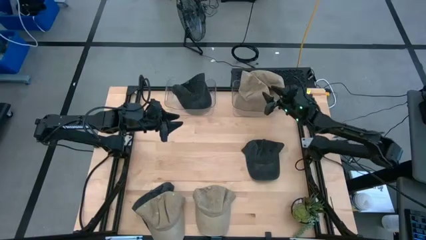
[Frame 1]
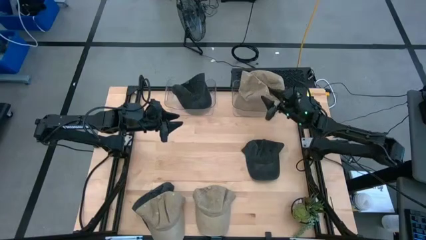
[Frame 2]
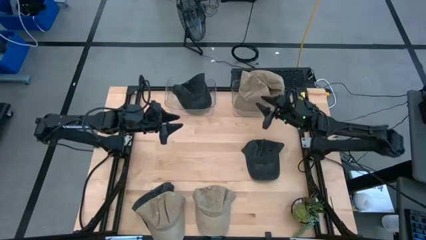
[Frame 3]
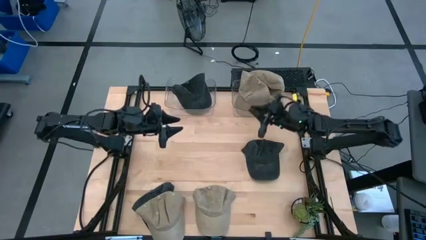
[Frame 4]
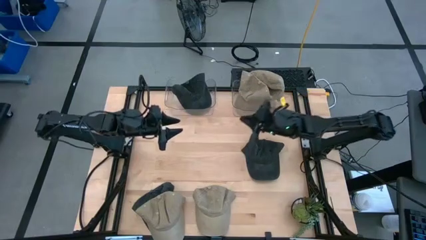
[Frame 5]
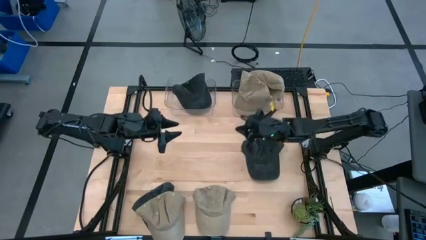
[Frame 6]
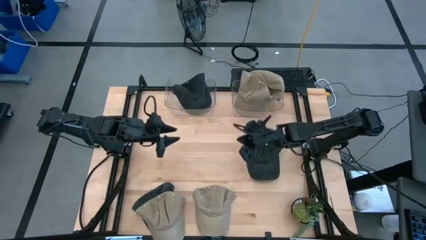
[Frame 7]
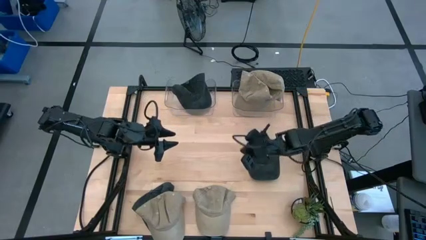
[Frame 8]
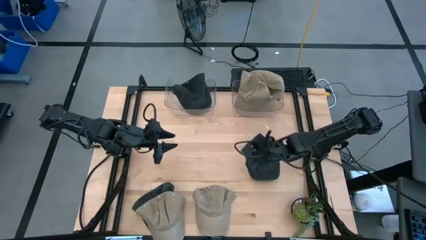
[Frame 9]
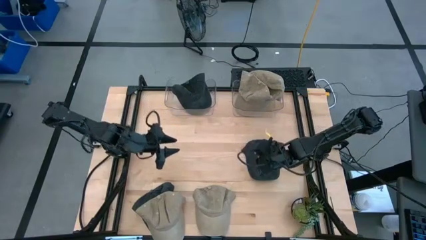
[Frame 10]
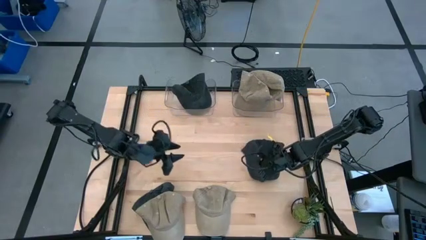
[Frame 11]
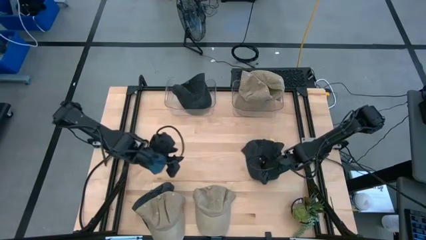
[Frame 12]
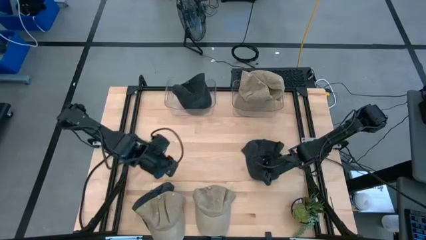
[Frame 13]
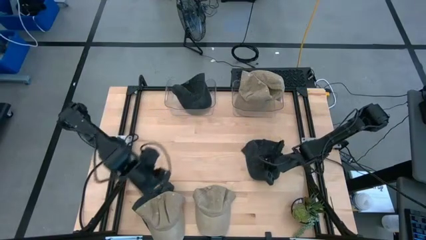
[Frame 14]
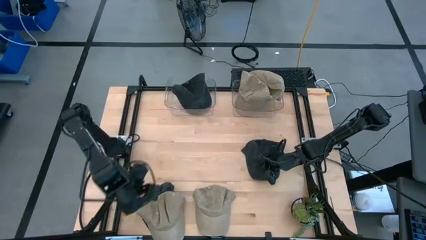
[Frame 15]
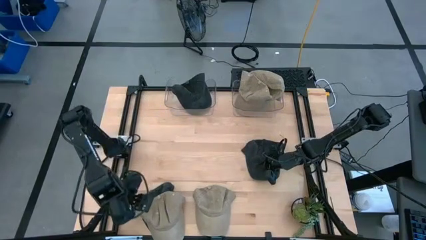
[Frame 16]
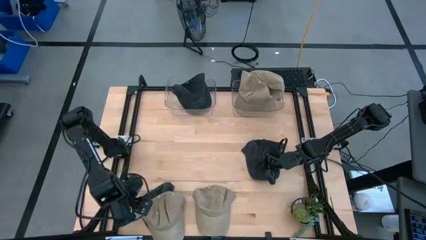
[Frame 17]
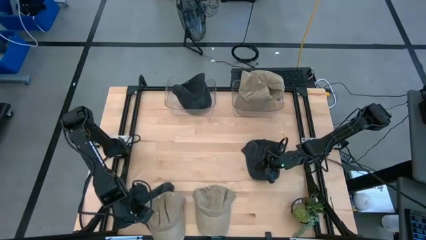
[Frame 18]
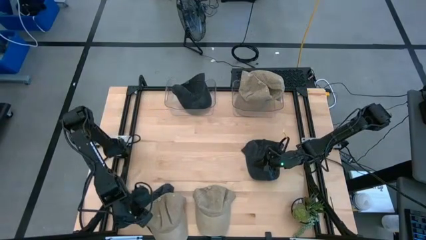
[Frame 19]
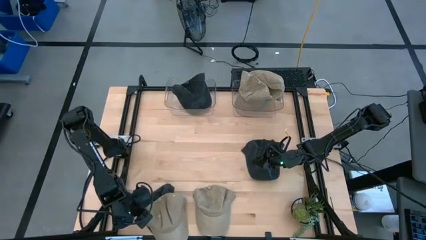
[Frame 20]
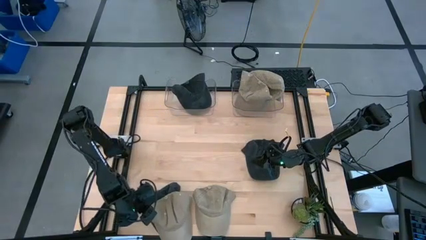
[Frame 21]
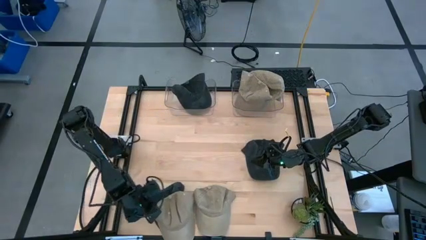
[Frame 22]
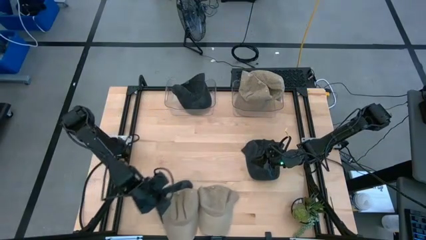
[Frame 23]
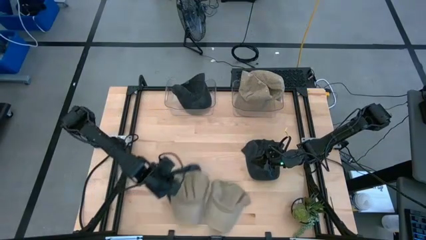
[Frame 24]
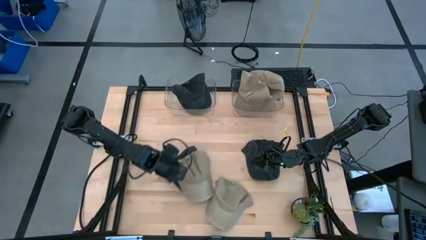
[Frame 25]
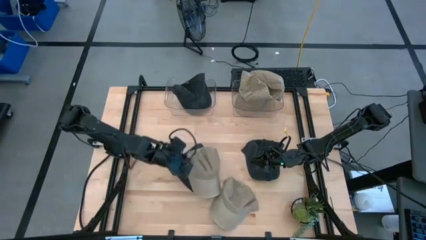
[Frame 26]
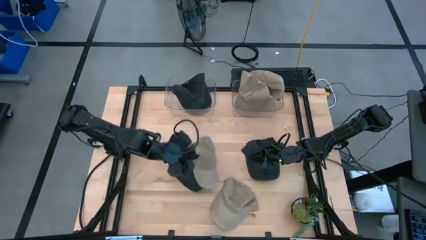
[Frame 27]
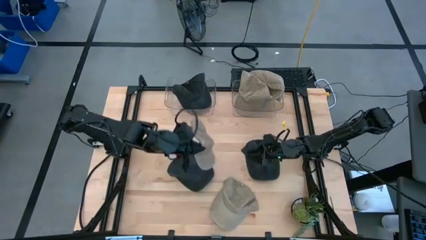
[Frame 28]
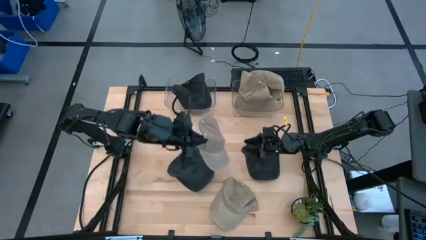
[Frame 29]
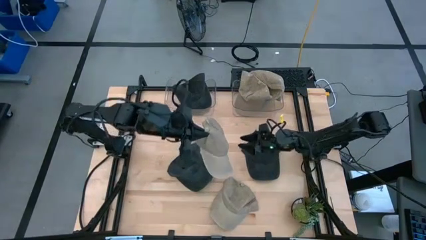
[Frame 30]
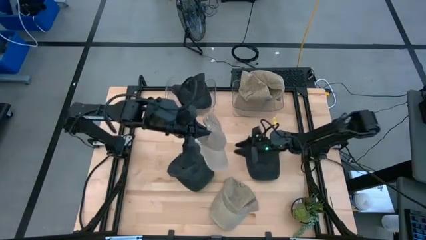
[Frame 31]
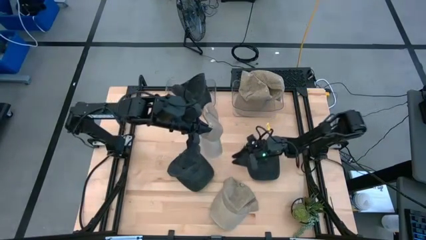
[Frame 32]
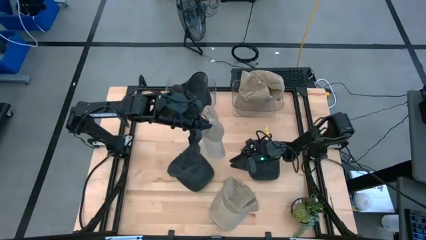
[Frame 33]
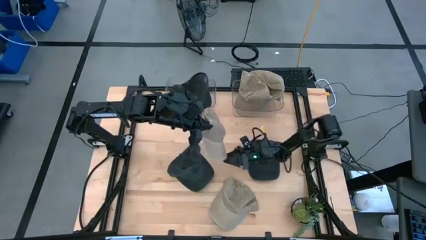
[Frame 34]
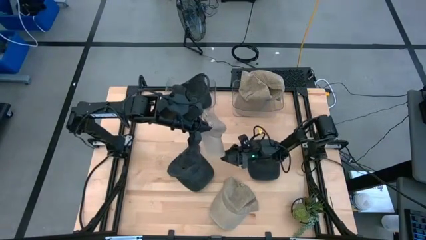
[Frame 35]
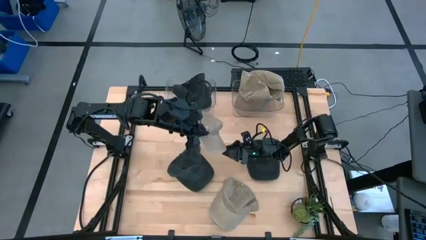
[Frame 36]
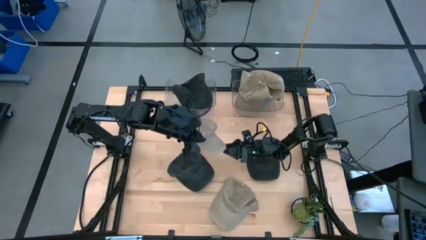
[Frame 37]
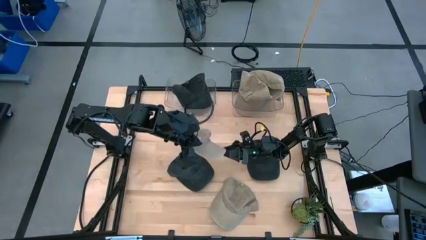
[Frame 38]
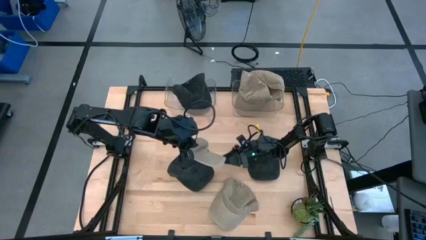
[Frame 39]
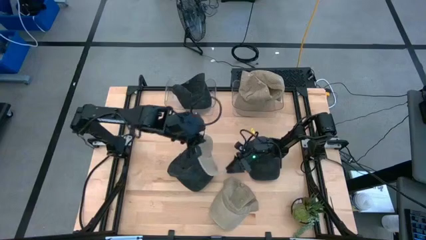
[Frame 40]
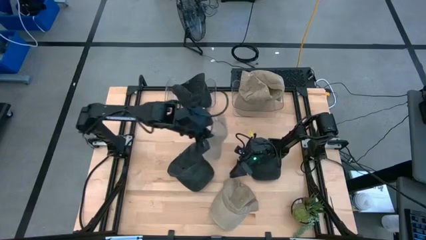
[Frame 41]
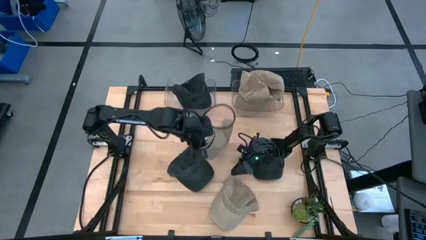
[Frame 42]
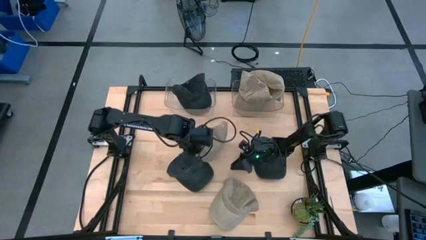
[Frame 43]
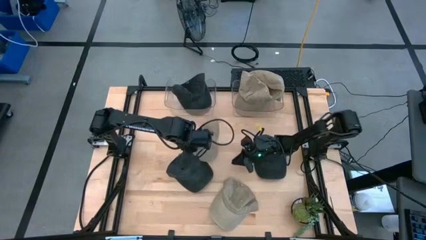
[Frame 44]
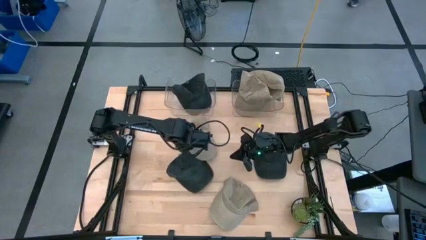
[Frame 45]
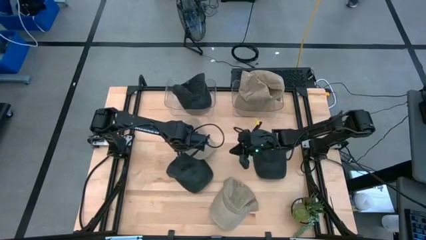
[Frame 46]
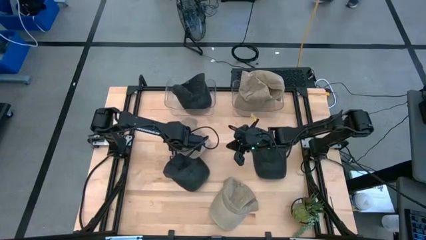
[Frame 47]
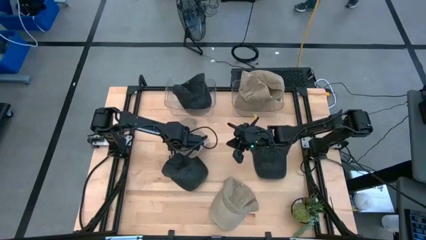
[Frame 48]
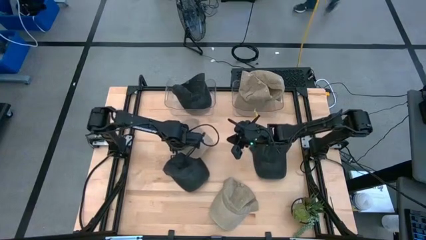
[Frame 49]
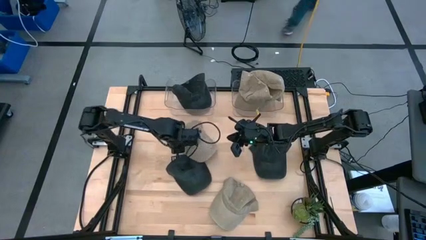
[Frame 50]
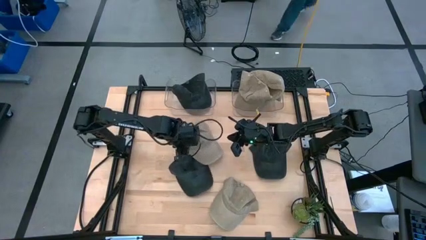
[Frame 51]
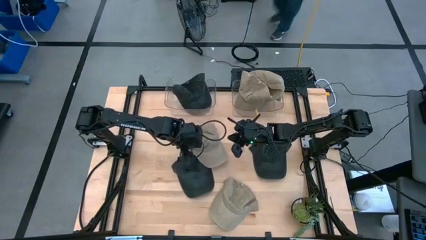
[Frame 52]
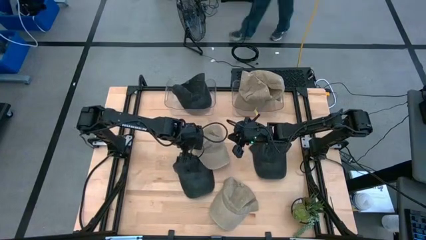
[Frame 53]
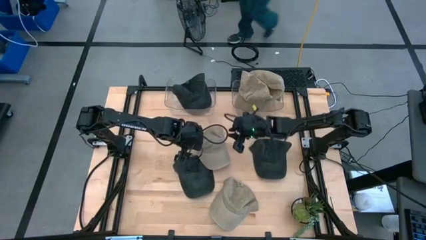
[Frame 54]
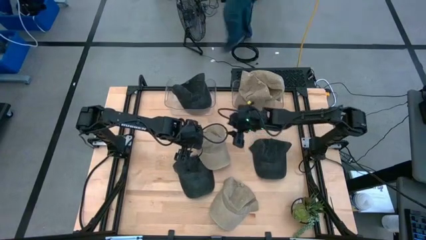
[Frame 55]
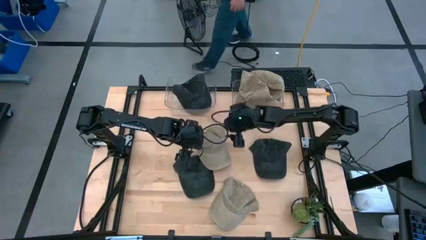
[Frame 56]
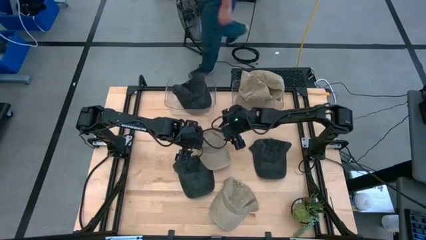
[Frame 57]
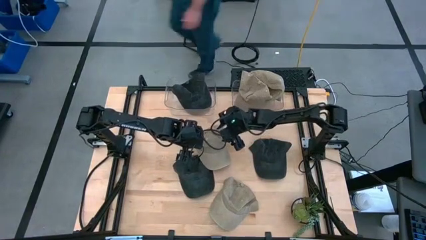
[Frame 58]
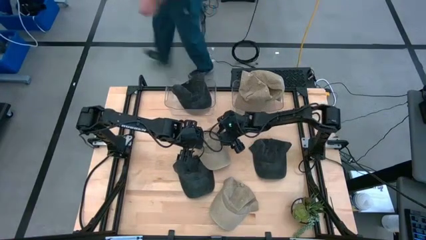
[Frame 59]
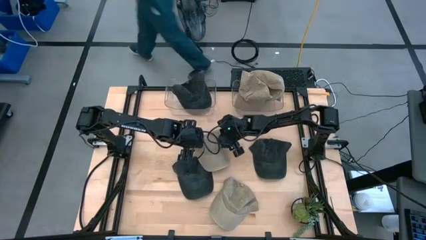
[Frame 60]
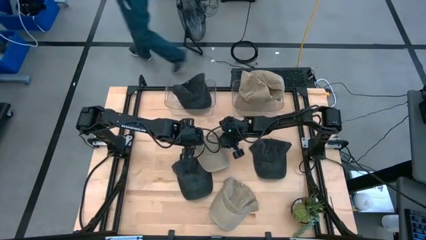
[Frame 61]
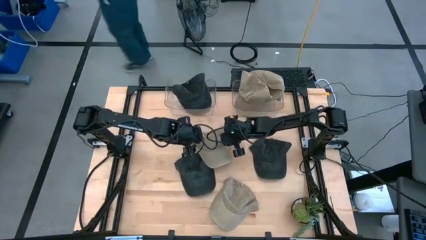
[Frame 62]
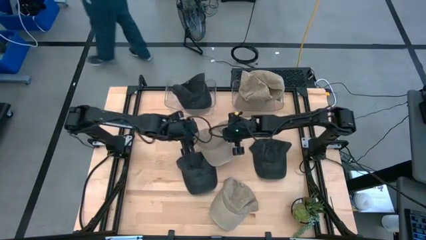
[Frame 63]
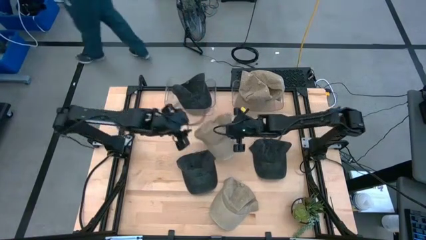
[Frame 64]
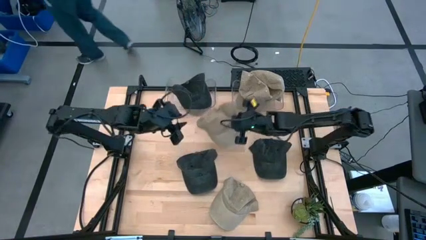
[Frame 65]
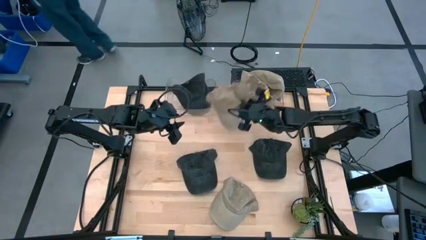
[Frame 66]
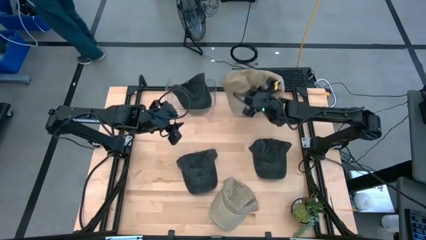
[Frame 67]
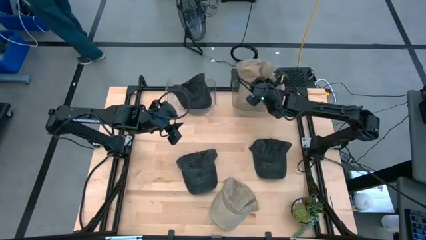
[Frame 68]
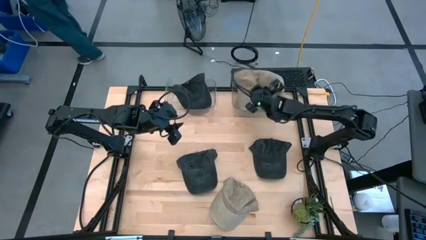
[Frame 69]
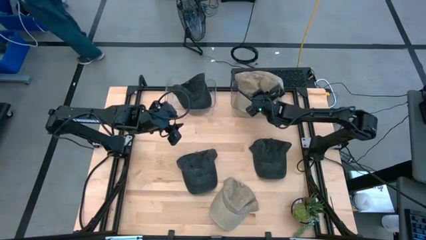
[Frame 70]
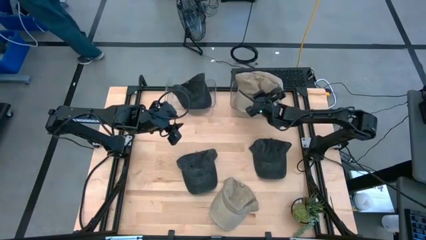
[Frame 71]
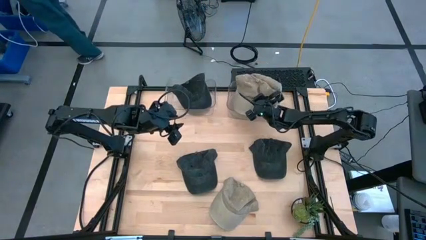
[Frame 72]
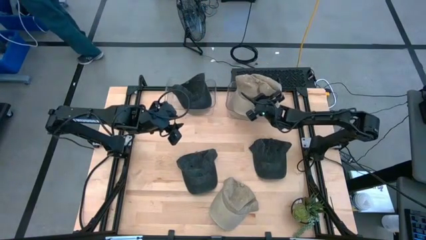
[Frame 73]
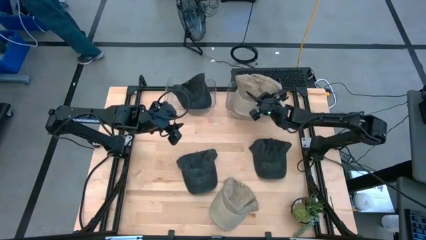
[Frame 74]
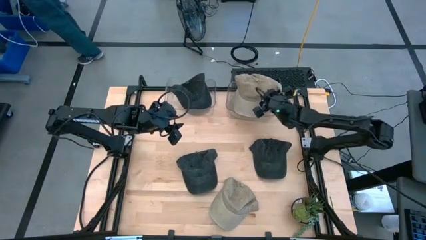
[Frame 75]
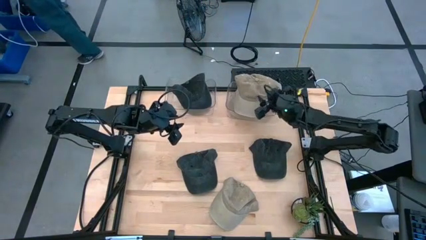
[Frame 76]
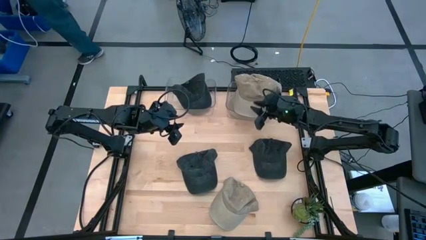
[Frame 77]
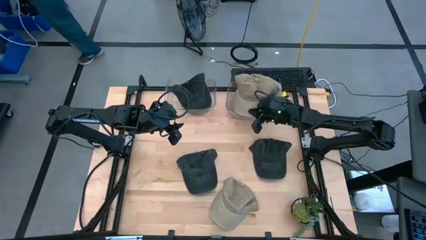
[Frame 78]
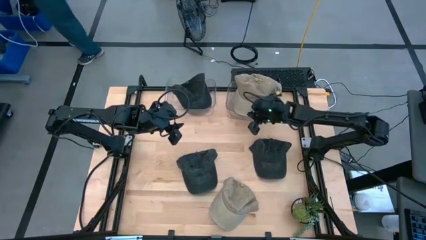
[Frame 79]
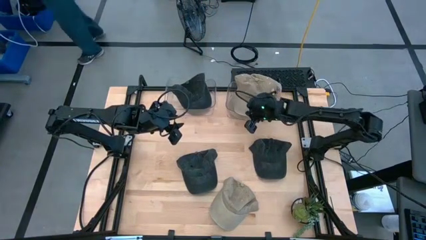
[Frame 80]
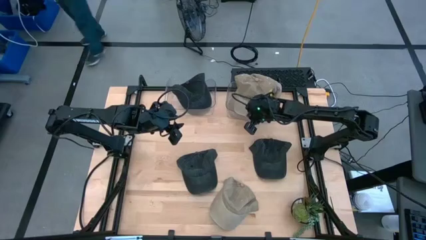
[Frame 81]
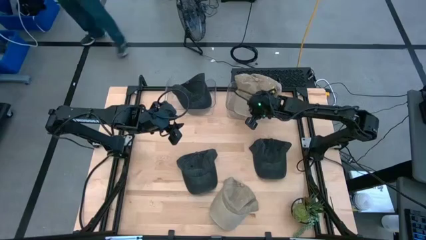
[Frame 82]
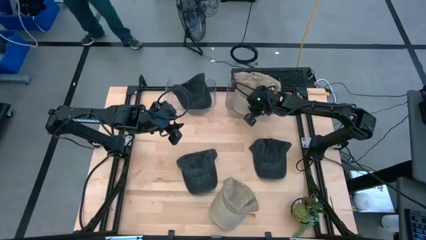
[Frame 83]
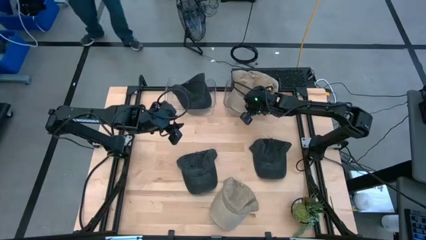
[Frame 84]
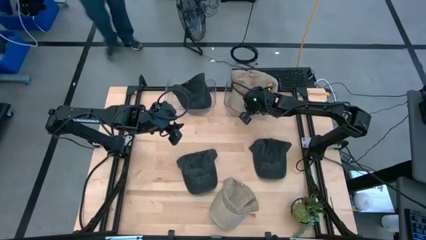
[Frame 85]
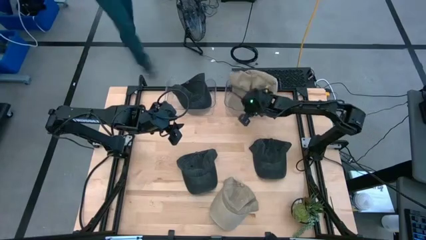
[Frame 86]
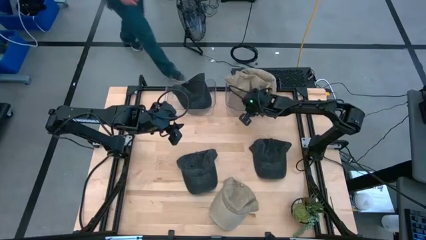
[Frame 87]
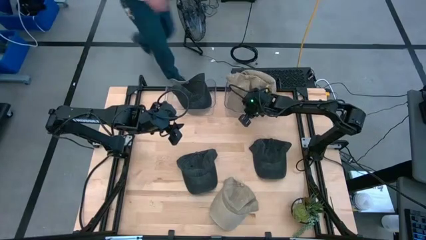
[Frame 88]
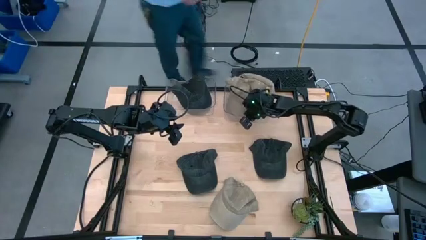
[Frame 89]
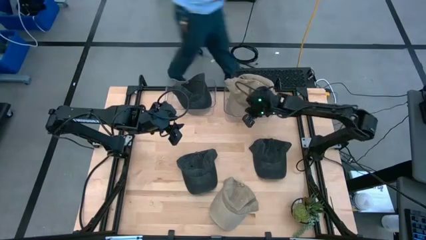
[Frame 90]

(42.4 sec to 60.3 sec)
Task: Pick & Place hat
Put the brown cap into the right transparent bin
